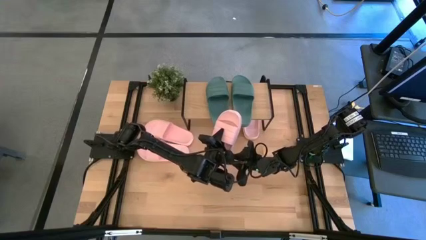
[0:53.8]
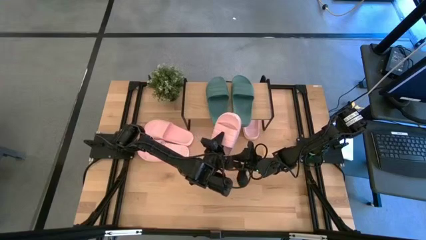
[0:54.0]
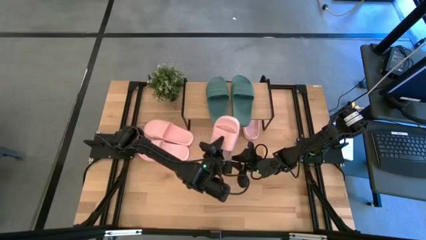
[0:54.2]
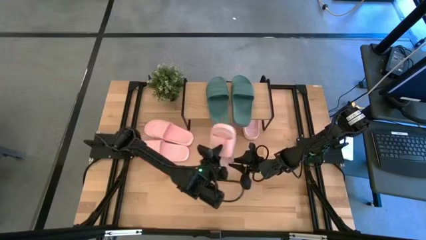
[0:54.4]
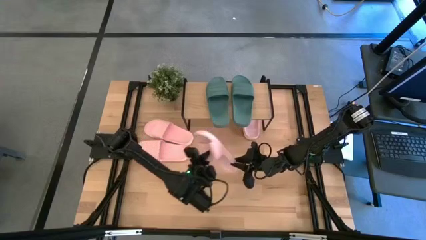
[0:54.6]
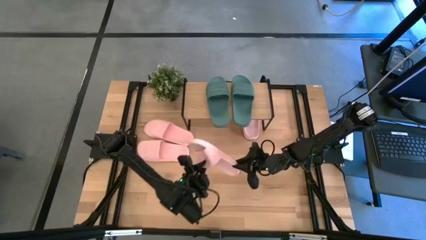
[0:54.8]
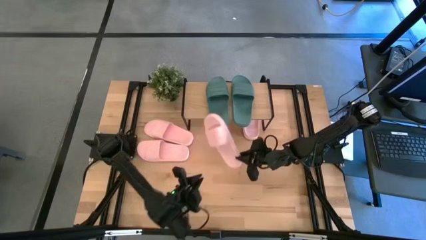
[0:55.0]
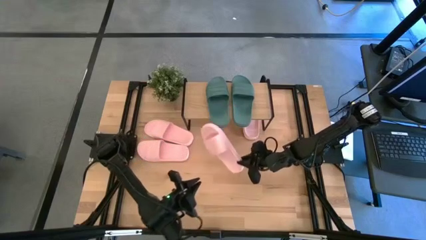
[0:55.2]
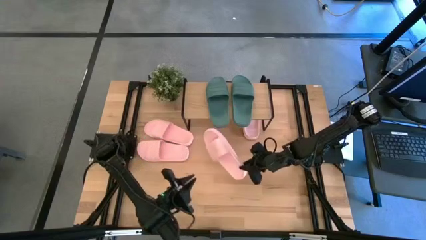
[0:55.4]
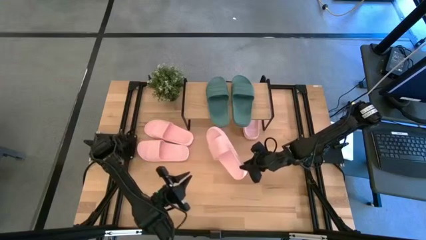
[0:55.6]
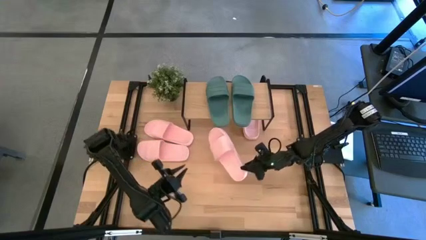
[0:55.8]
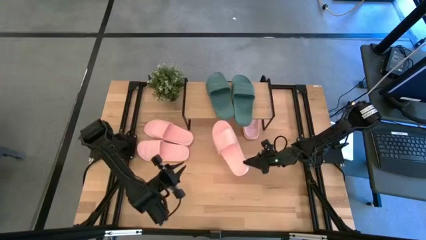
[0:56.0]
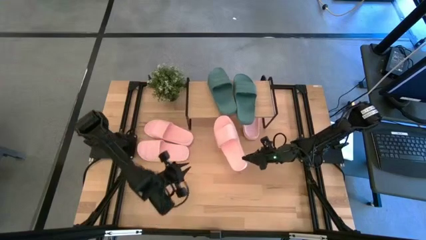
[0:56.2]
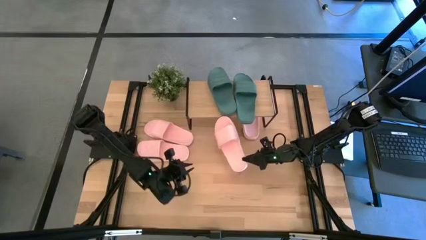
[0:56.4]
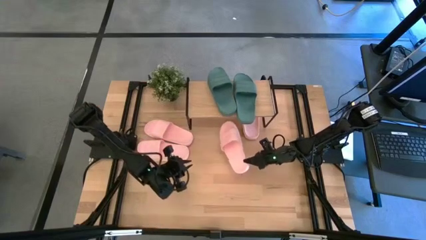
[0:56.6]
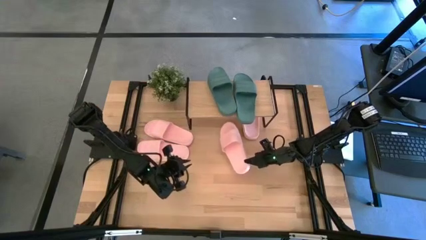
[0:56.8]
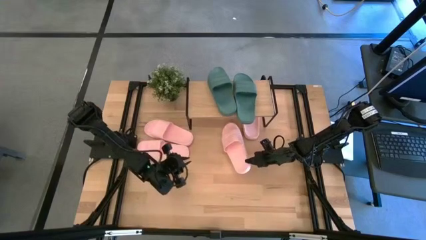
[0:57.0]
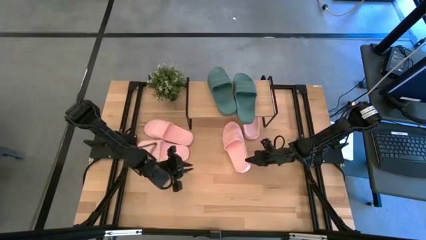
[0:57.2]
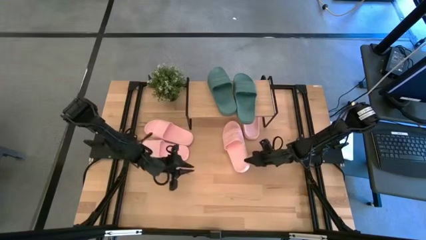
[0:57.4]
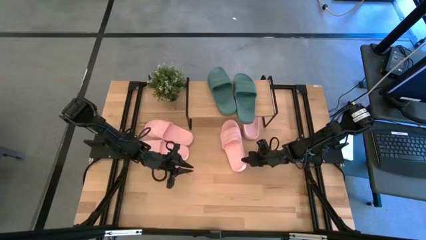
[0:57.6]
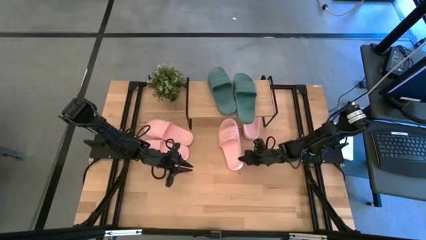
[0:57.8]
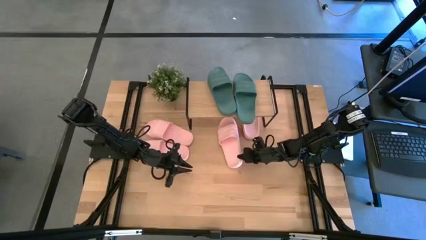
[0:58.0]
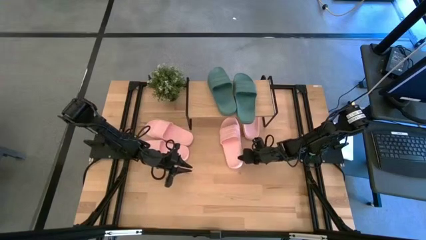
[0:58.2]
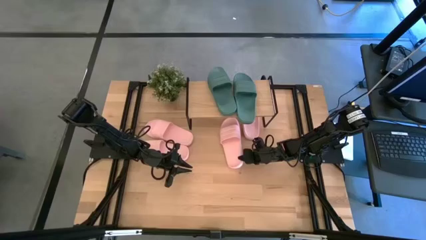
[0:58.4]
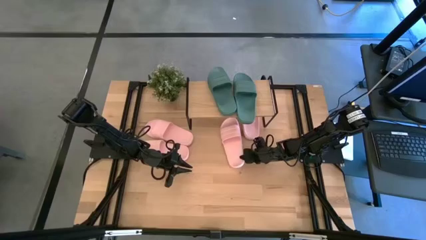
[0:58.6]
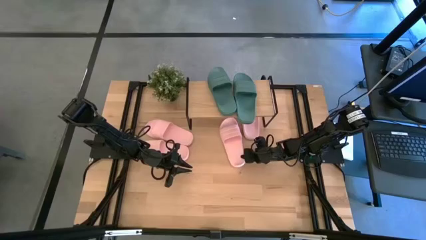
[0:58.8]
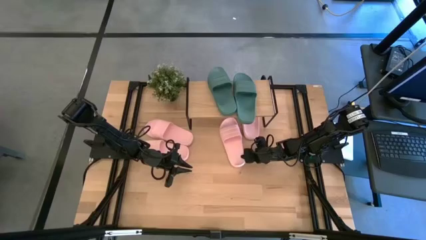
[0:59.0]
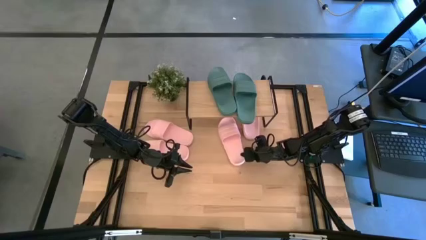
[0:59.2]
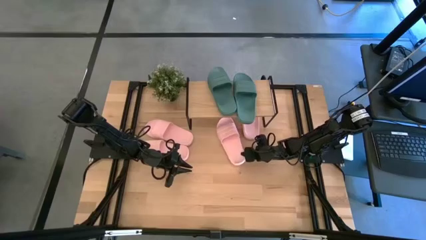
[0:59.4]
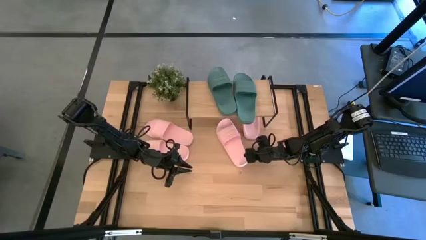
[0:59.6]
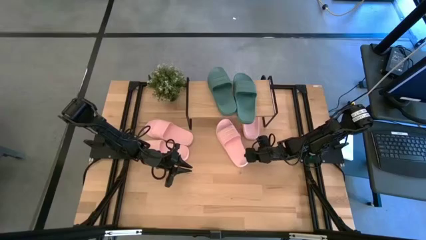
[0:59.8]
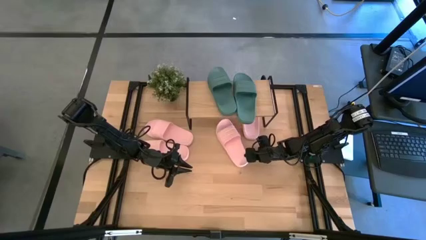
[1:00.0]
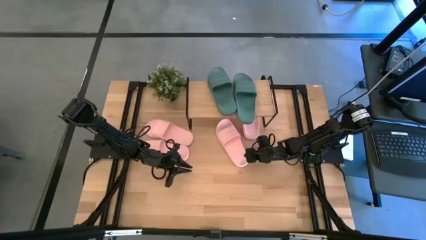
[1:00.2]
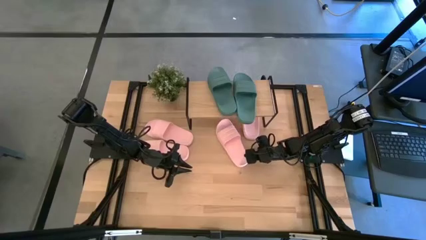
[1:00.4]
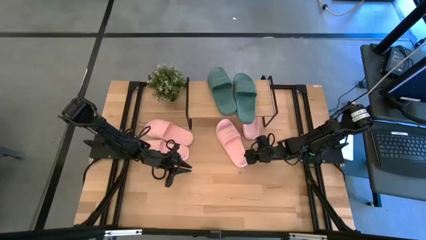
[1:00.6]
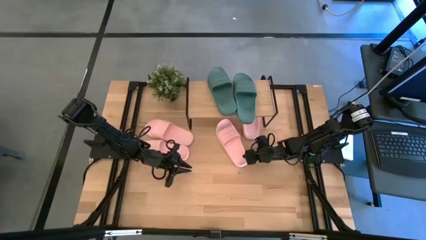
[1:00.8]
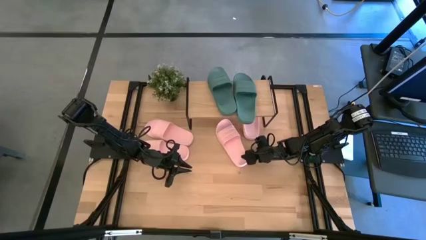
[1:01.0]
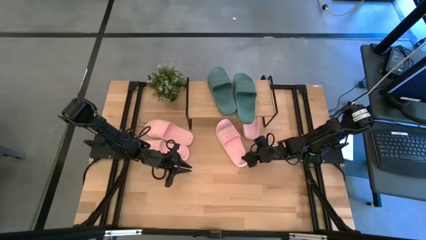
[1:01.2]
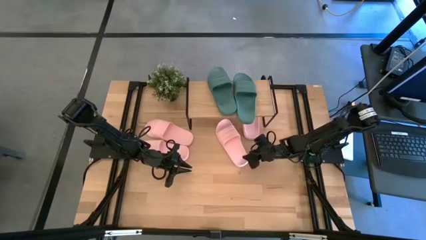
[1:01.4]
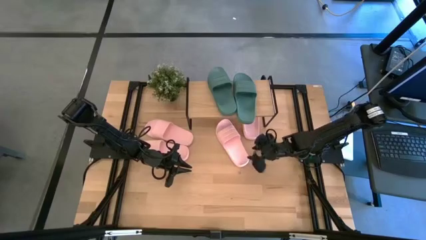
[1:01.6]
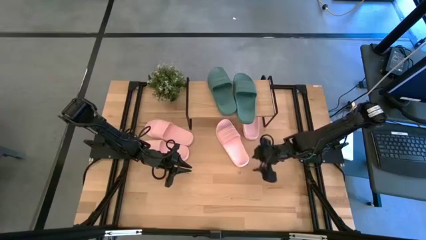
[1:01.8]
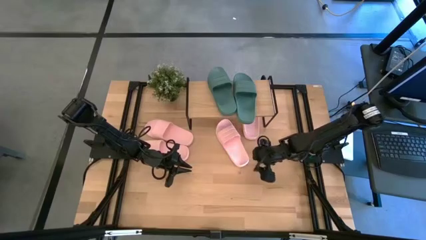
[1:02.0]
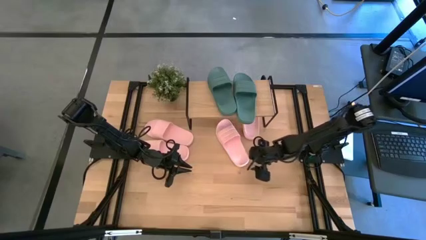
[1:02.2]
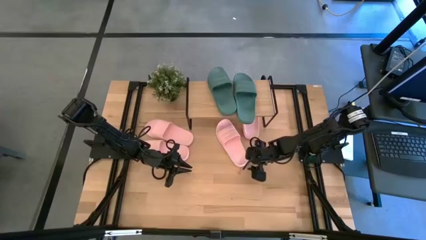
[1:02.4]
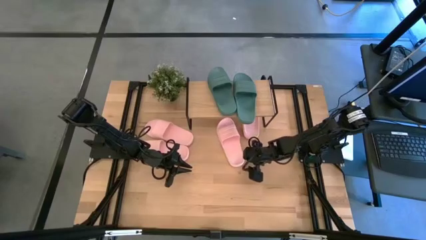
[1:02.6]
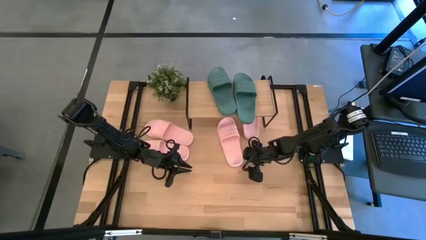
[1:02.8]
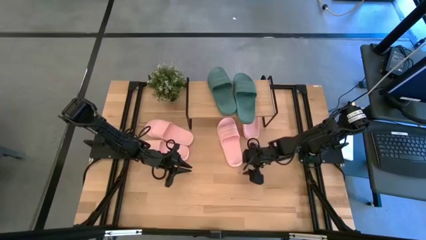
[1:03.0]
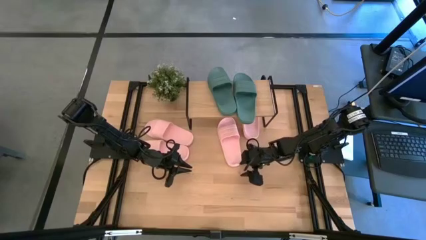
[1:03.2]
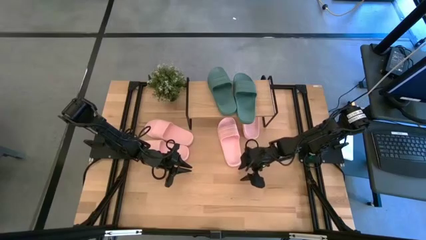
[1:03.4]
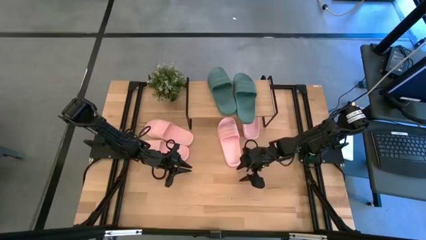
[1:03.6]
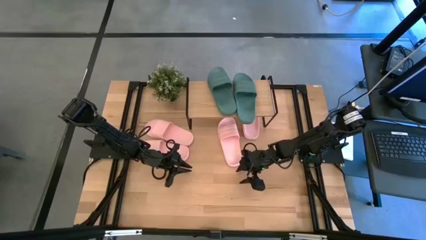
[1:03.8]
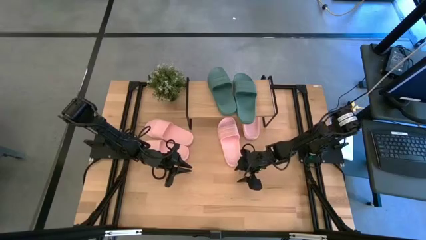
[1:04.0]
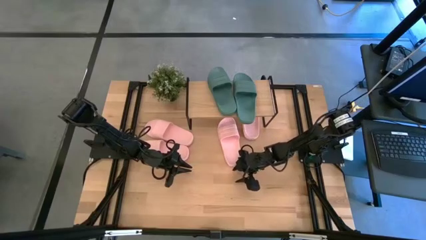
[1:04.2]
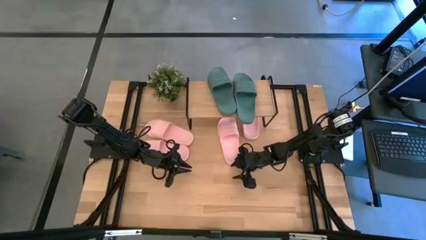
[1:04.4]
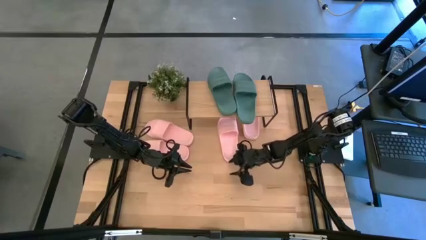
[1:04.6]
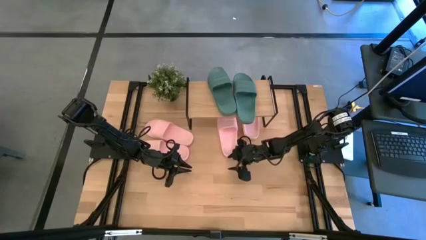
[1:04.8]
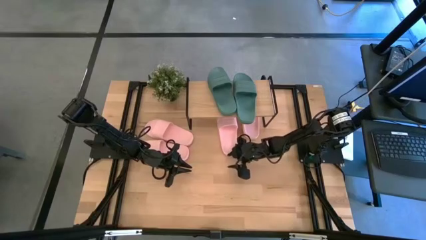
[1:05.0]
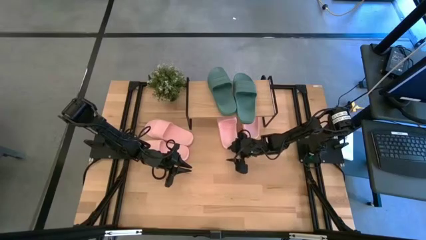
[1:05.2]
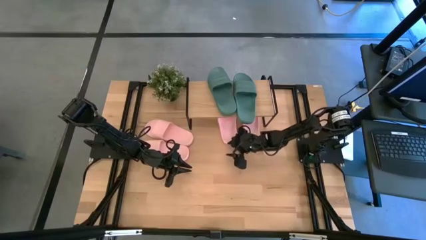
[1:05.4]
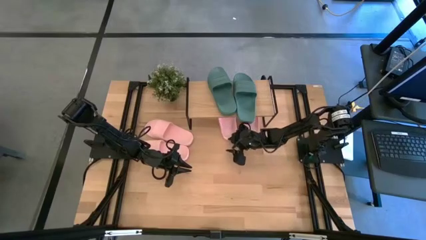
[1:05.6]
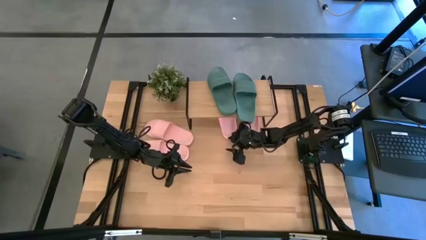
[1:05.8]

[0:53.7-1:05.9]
Task: Pick and place slides into the shelf
Put the pink slipper under the shelf
